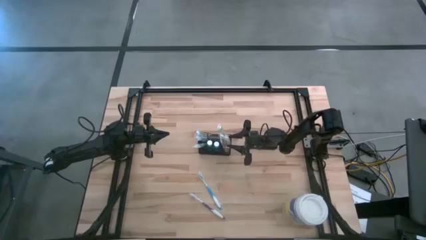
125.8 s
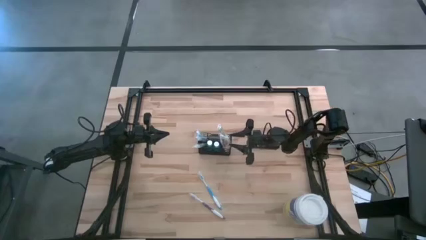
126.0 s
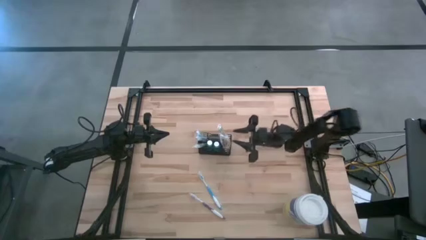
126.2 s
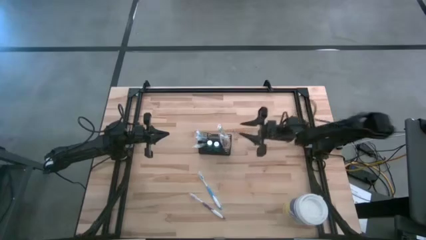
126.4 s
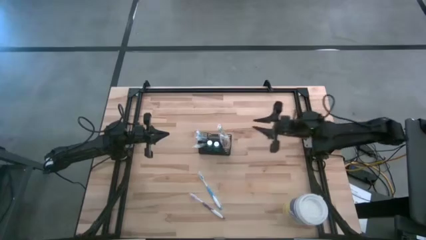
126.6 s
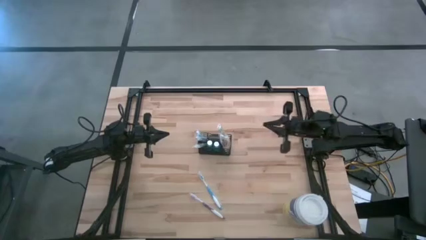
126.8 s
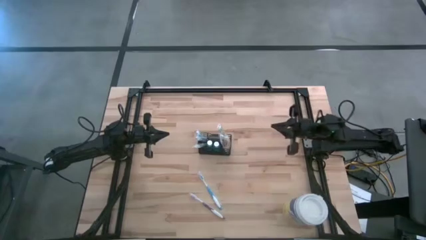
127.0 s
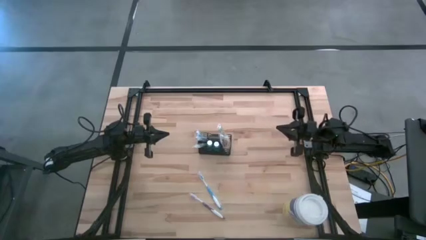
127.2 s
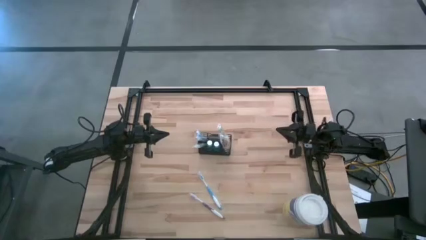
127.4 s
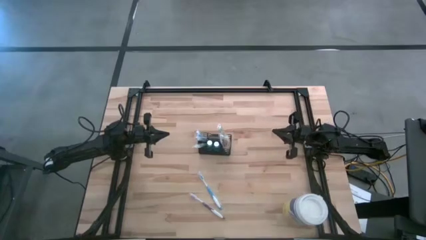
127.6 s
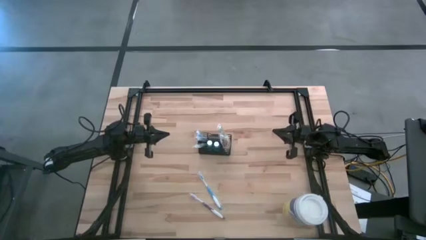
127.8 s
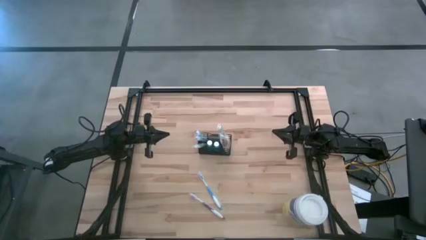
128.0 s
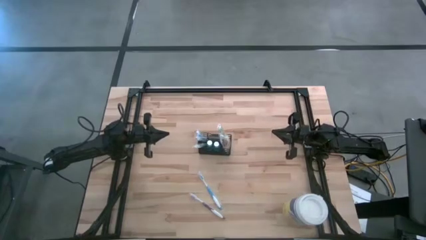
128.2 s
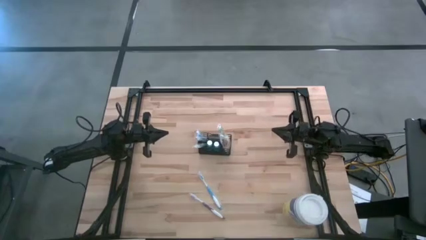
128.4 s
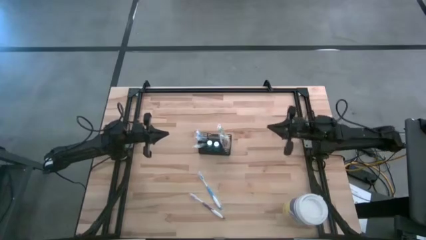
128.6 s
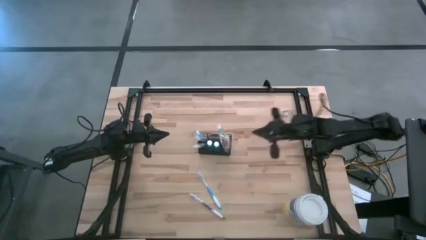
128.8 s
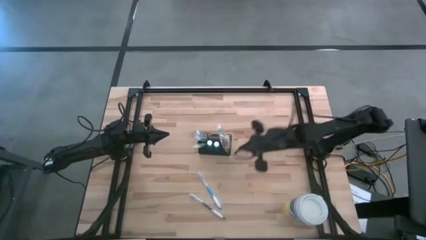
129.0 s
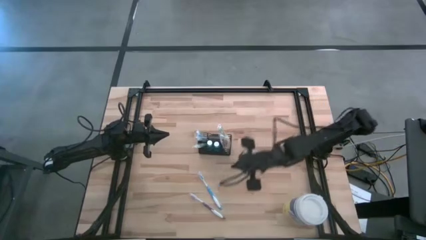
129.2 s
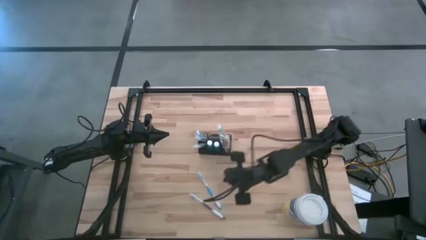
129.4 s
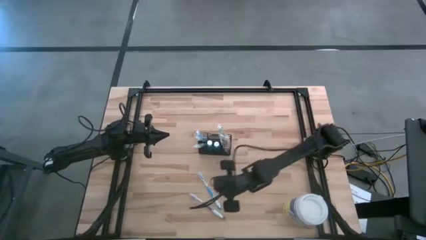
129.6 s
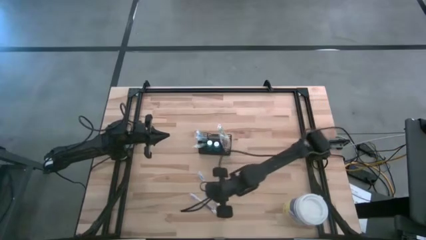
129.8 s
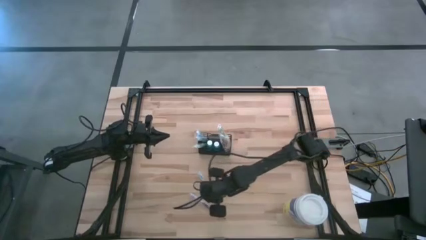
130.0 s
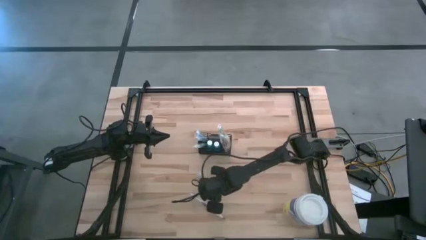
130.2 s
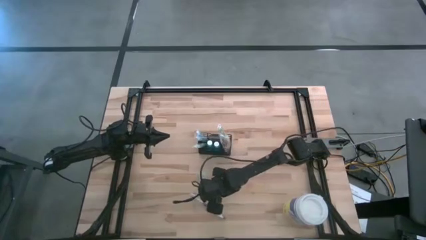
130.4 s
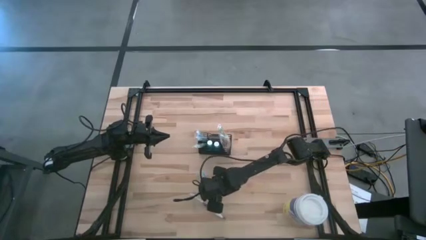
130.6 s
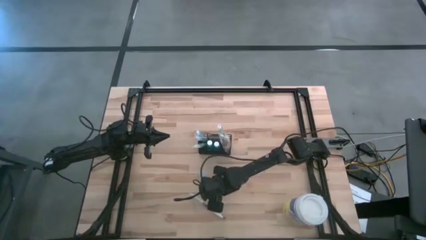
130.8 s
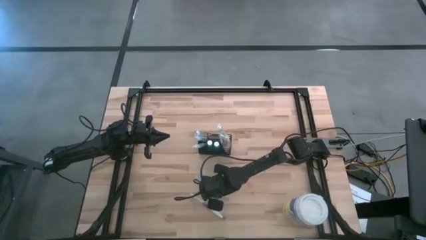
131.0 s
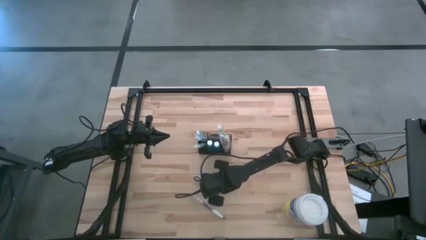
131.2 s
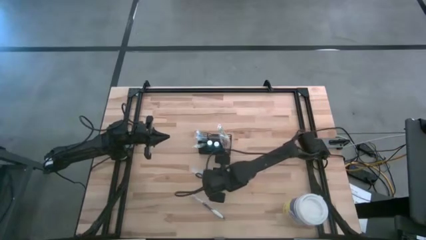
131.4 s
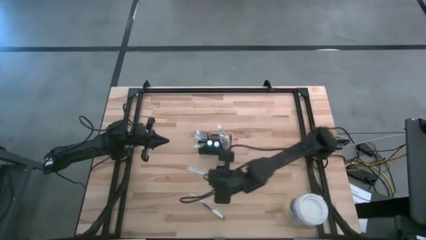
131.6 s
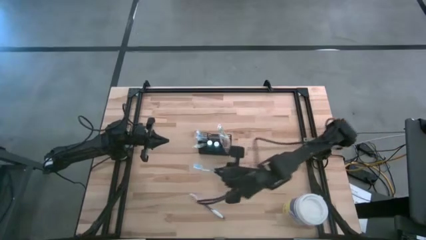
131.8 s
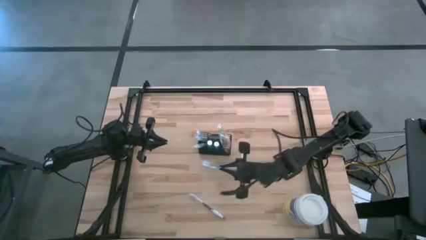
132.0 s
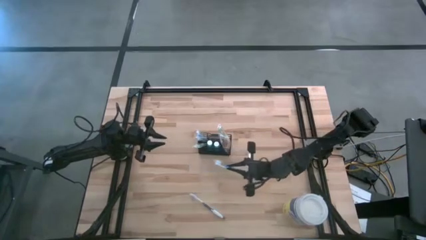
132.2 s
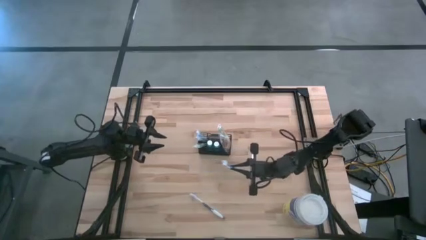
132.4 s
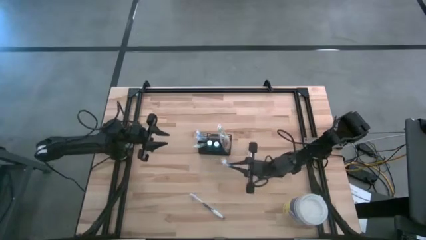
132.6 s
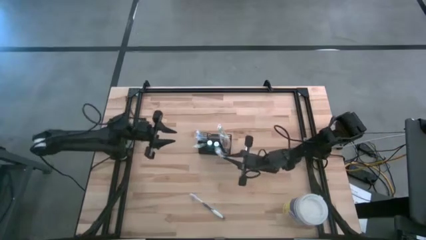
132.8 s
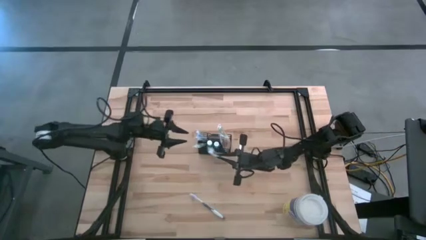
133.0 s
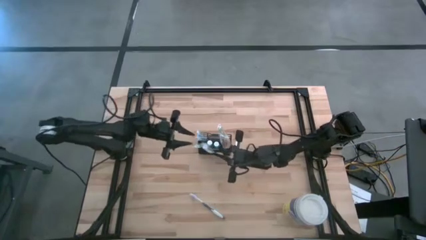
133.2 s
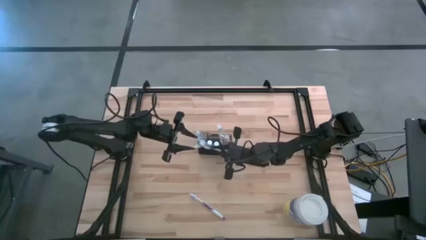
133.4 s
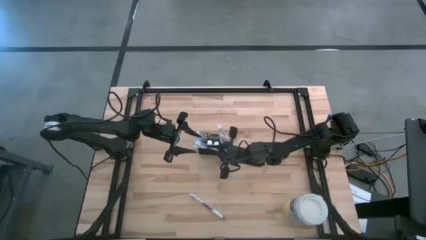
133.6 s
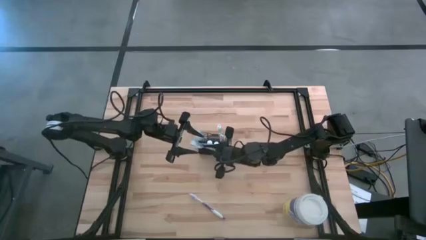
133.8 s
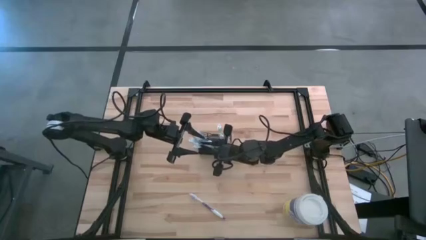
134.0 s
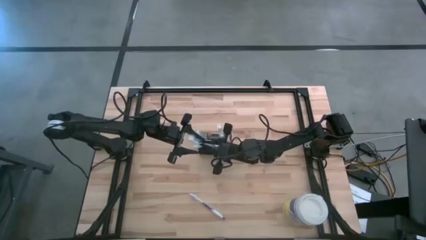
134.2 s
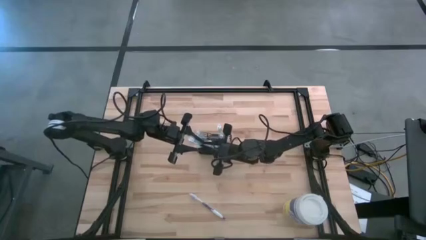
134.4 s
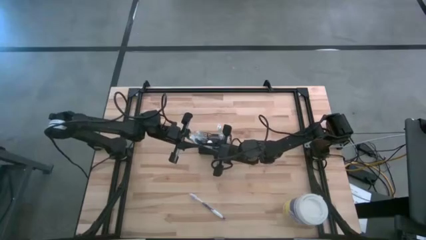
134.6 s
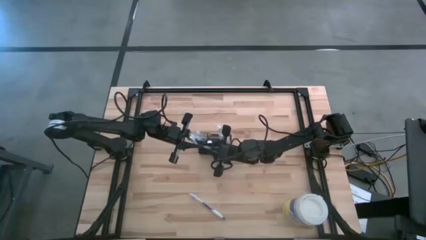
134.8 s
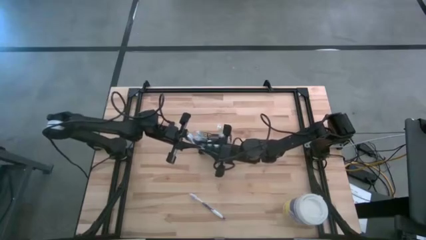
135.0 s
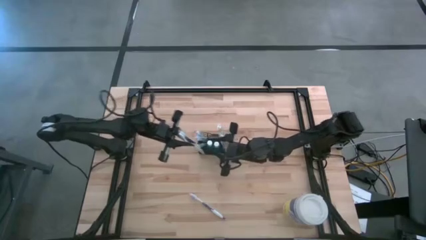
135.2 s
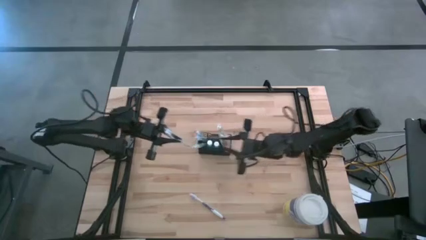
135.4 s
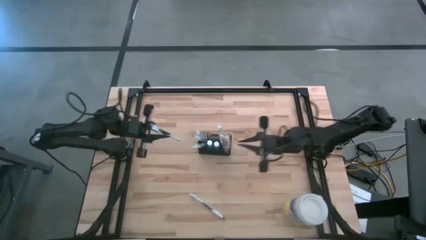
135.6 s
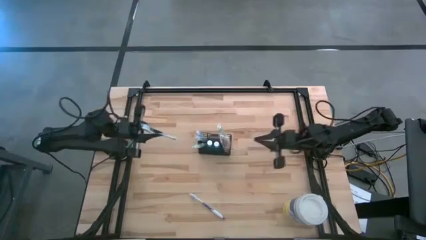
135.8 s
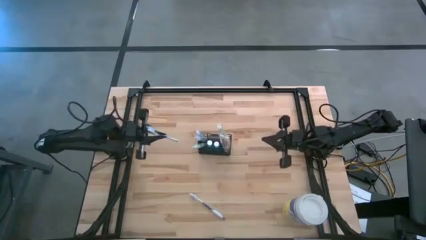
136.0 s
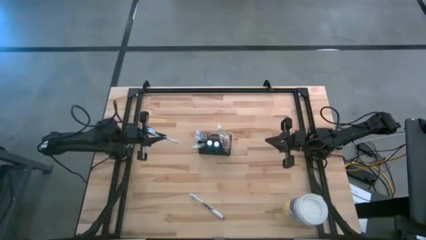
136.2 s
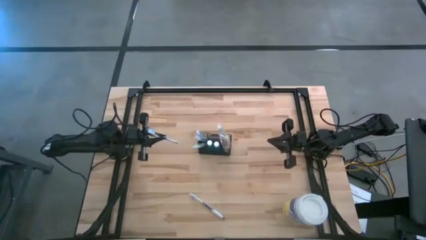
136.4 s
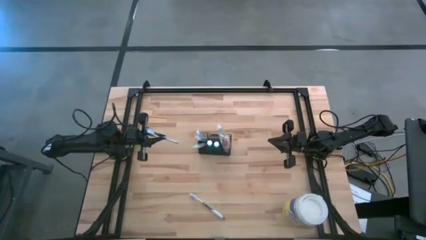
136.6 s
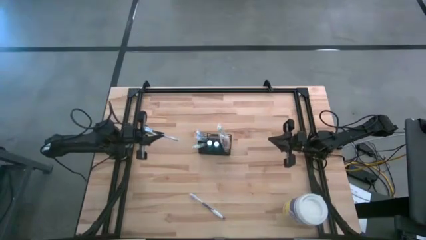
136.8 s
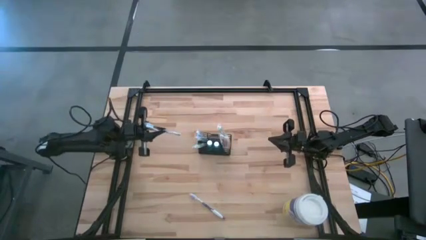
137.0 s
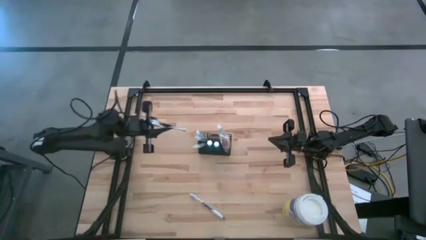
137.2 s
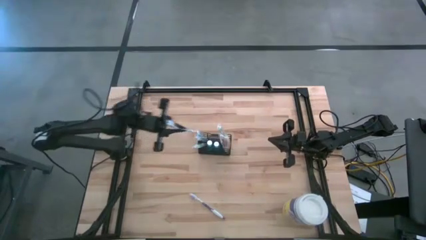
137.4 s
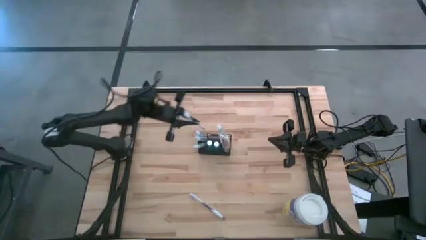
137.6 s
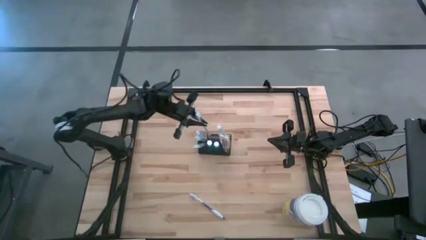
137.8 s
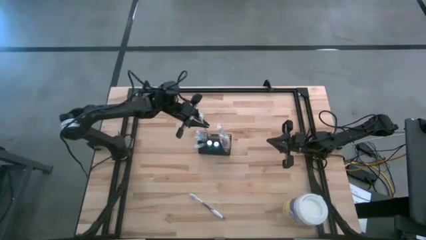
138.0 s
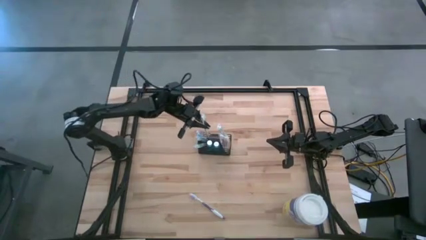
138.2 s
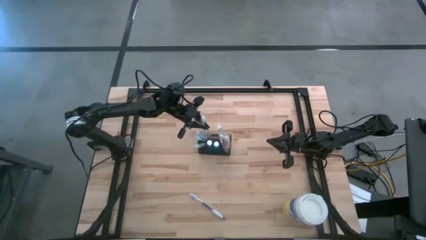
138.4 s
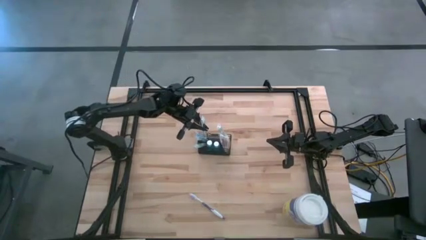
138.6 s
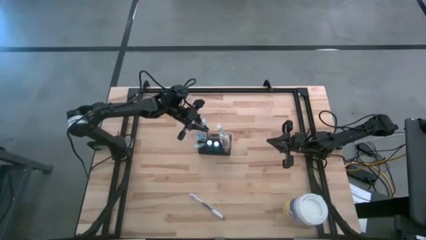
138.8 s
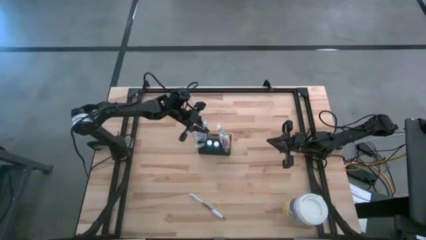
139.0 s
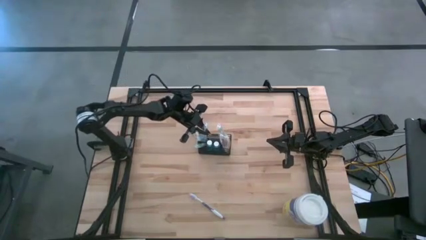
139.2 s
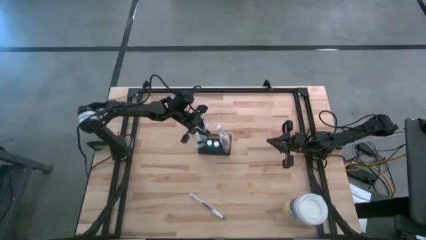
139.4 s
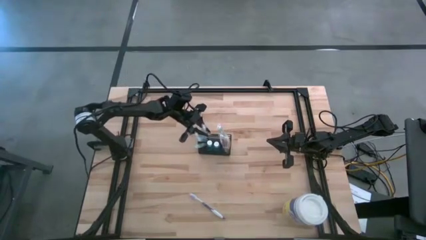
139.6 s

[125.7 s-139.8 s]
Task: Pick & Place toothbrushing station
Put the blue toothbrush into the black wire organizer
